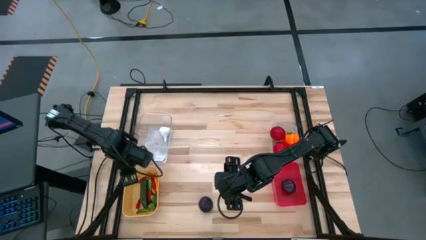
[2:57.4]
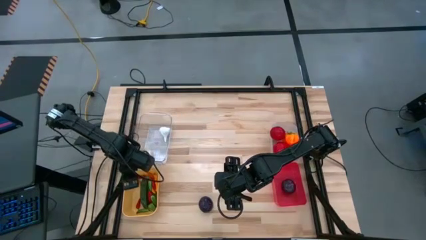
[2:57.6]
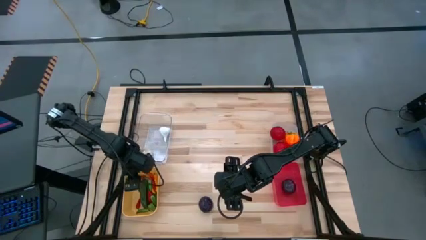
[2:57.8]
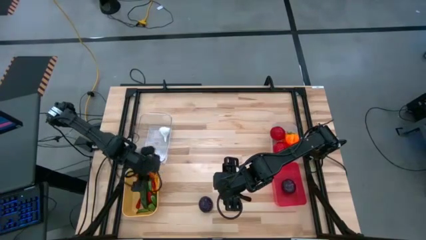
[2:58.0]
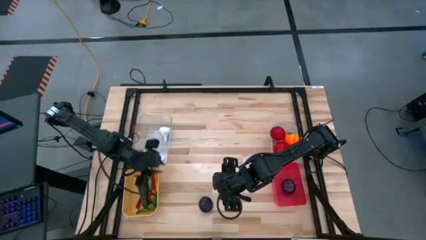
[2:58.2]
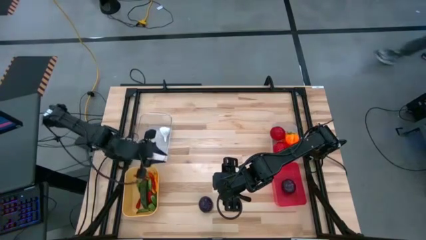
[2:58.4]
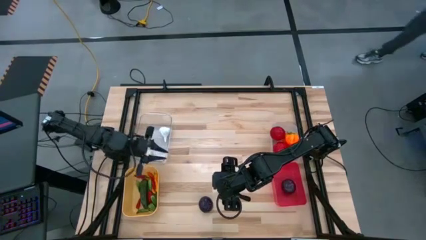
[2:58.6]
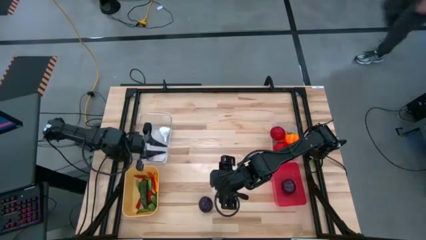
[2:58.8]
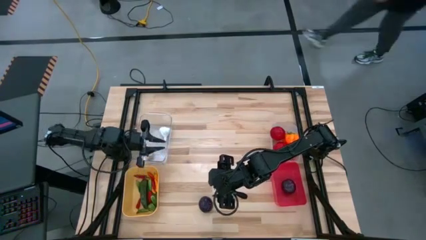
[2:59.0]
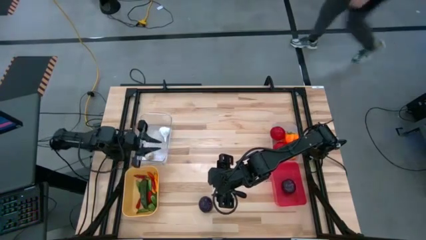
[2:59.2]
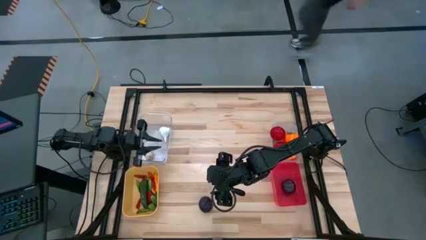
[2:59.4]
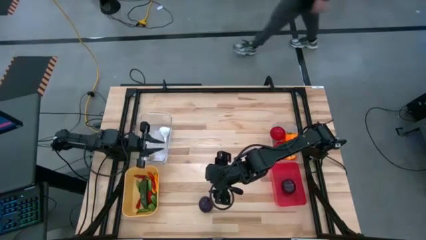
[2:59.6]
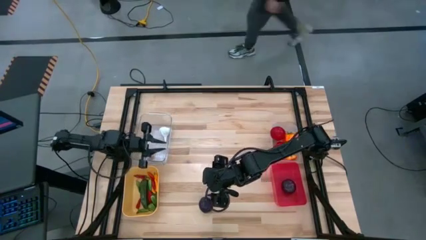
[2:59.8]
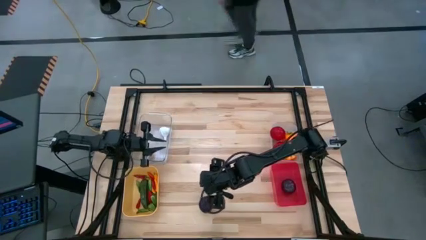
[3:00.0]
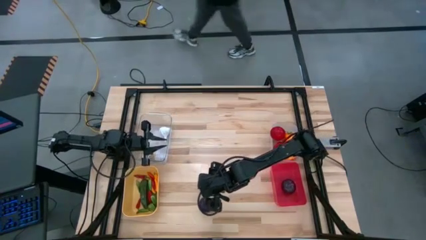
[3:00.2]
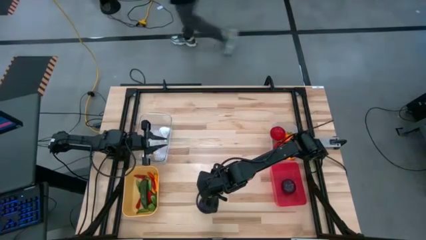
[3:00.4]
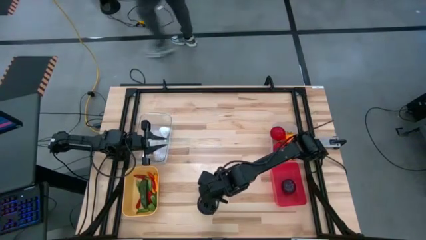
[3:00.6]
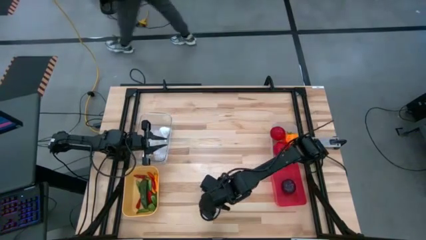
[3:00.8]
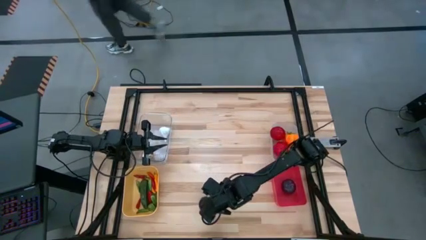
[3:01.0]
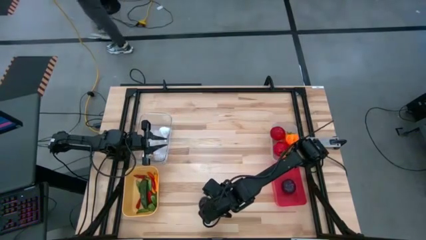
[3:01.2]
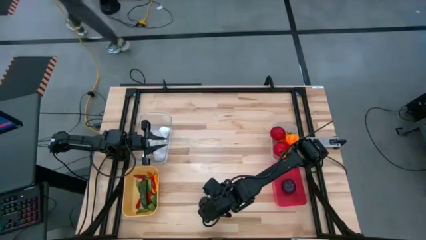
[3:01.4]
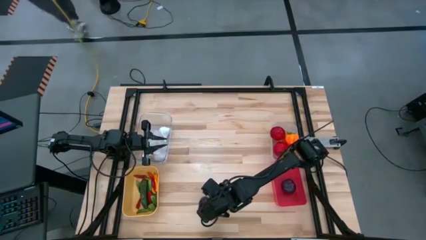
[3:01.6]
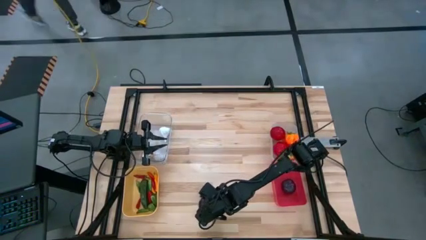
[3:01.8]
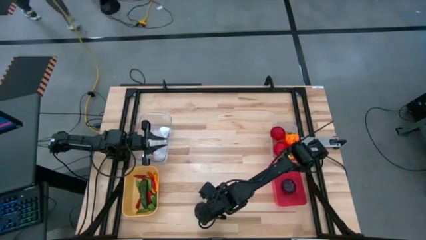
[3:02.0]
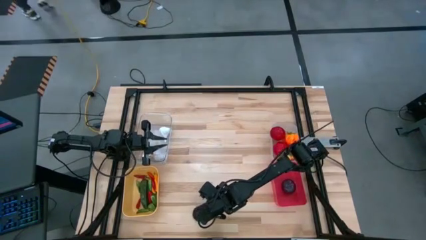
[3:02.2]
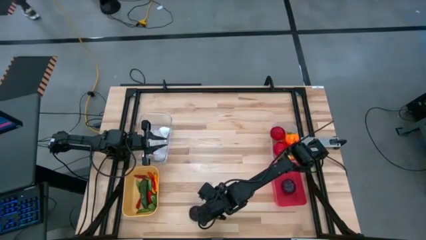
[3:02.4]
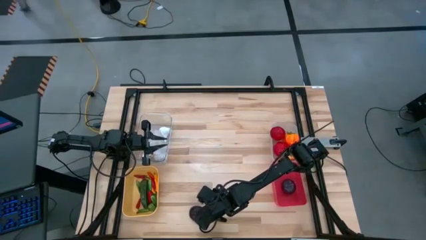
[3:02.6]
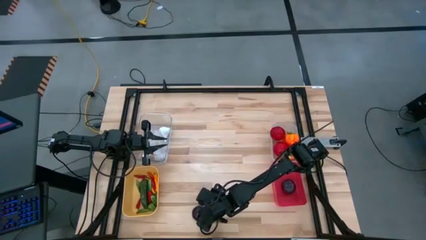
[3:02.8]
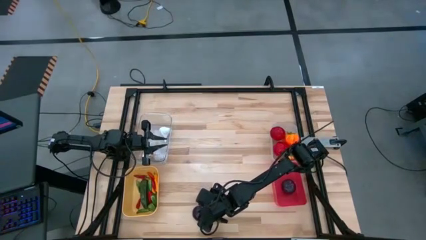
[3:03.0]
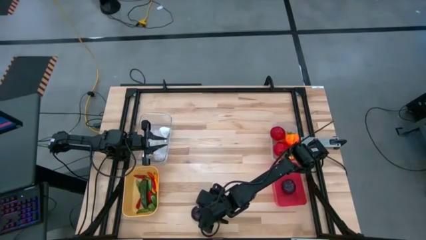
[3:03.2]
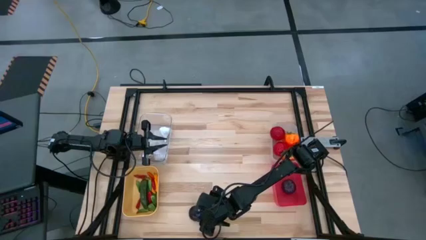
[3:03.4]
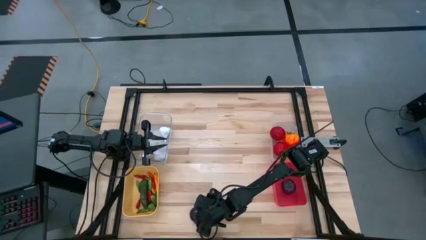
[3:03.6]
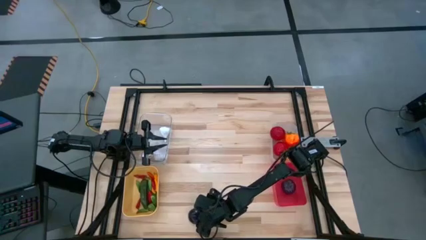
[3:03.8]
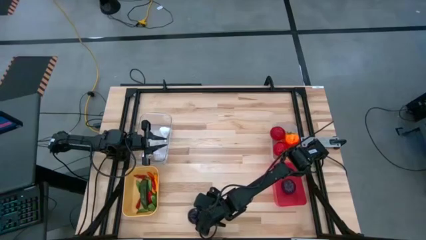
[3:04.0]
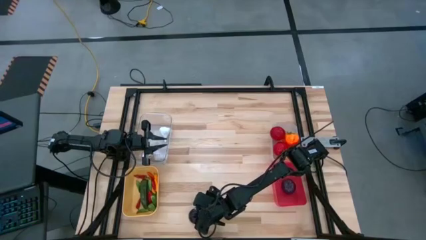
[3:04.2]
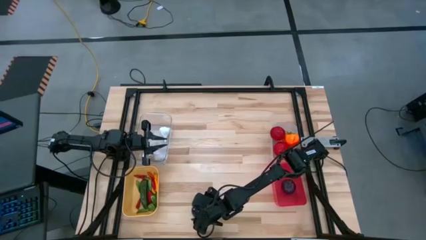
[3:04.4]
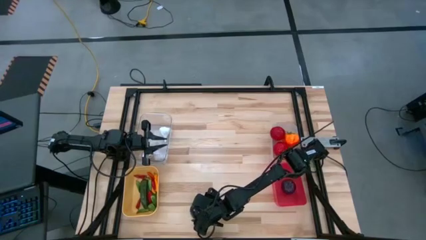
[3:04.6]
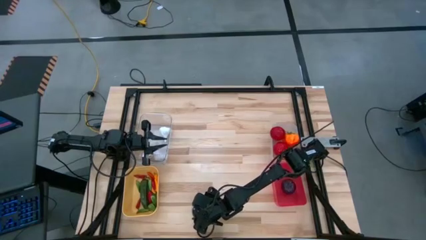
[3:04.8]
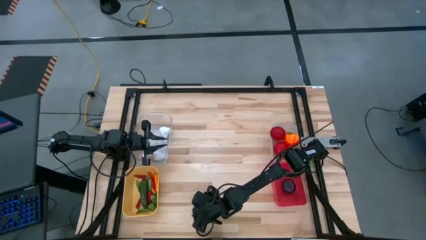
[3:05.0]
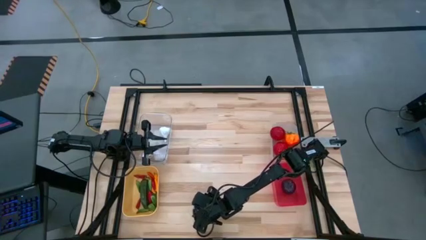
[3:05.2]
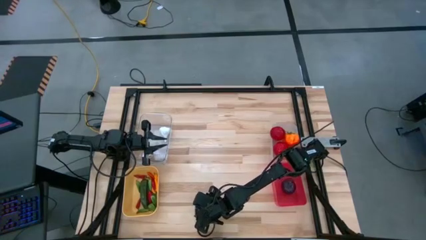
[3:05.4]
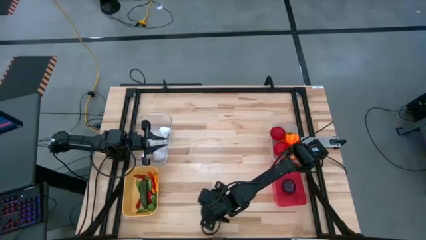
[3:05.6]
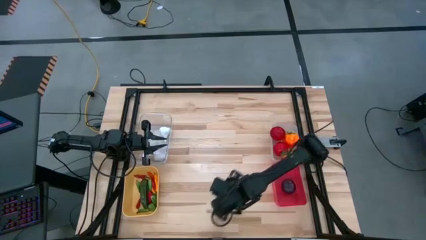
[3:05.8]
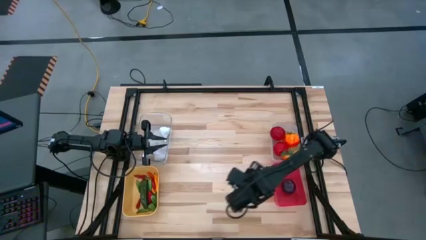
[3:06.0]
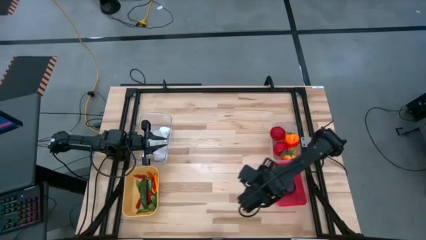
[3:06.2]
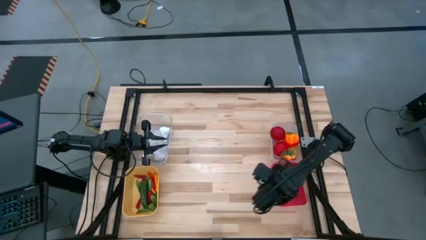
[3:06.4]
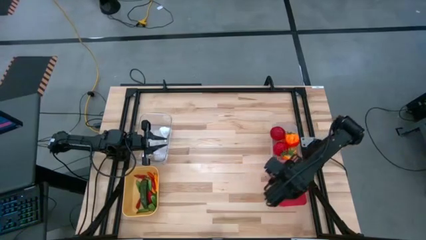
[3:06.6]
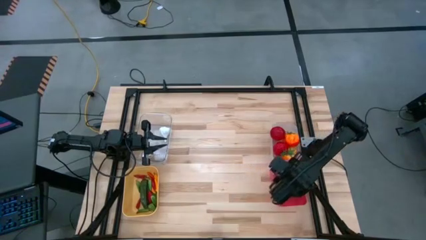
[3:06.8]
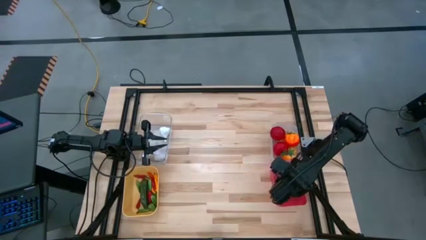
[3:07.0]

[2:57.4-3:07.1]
Task: Sort produce into baskets
Put the plum into the red bin

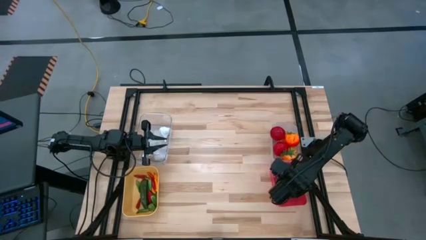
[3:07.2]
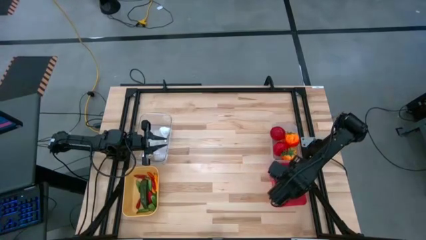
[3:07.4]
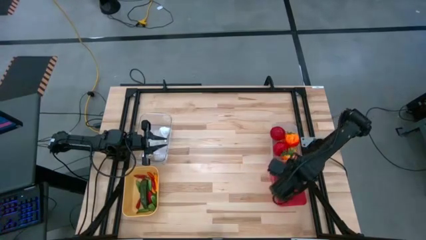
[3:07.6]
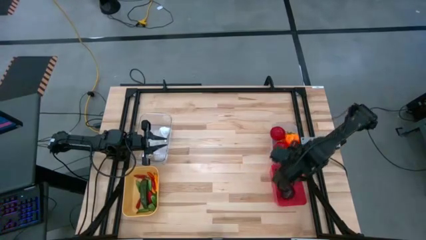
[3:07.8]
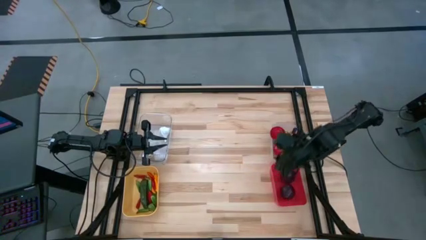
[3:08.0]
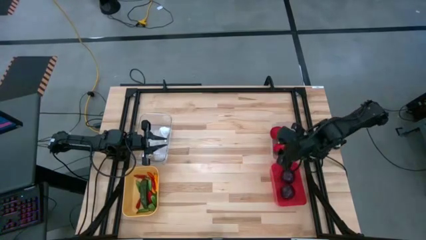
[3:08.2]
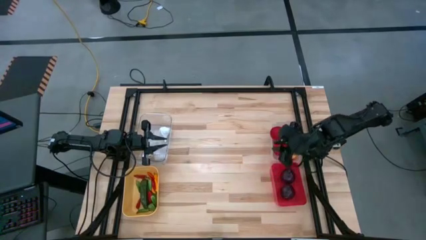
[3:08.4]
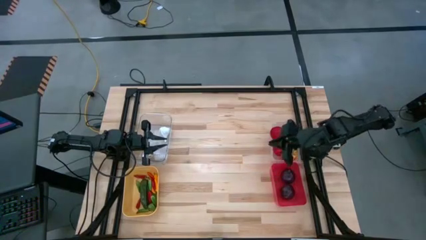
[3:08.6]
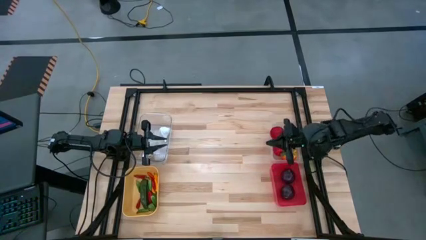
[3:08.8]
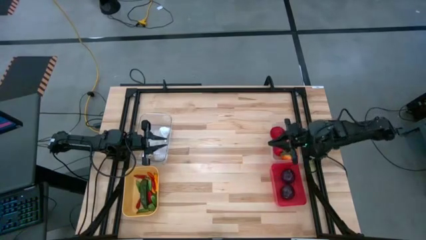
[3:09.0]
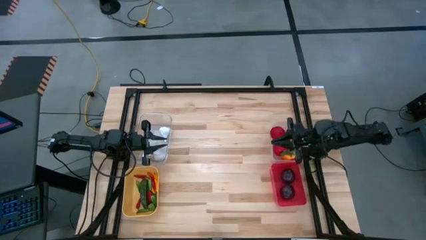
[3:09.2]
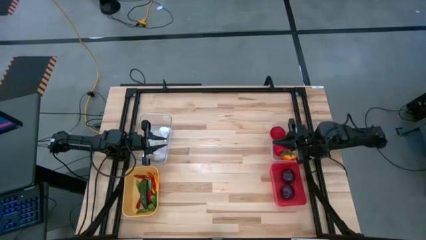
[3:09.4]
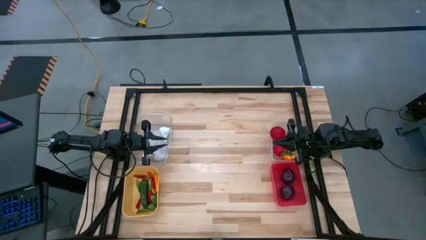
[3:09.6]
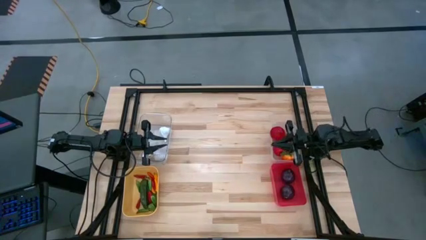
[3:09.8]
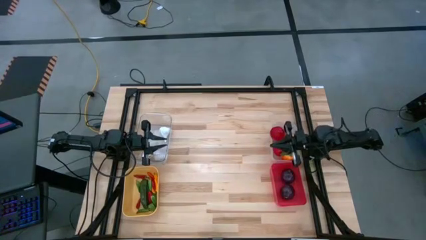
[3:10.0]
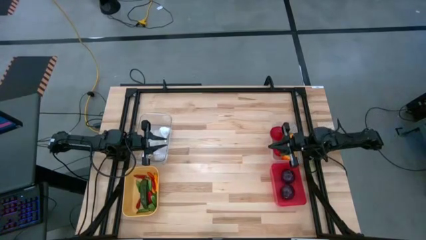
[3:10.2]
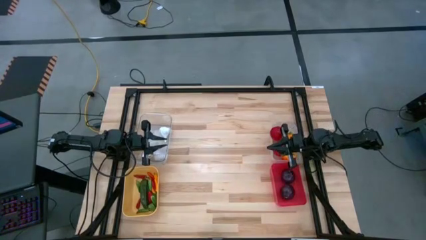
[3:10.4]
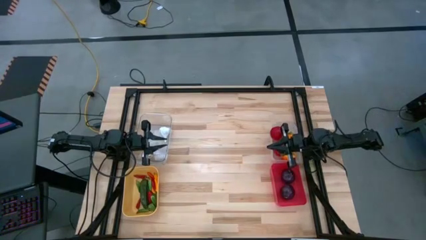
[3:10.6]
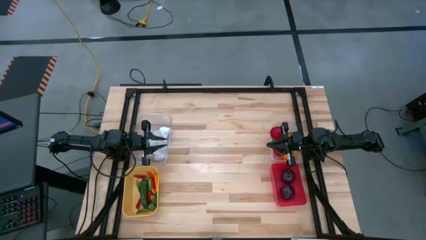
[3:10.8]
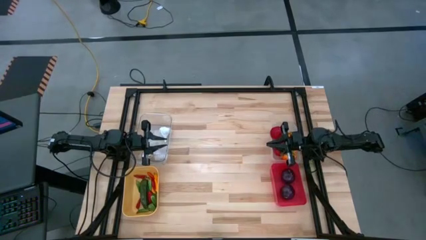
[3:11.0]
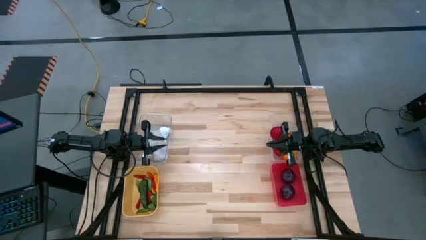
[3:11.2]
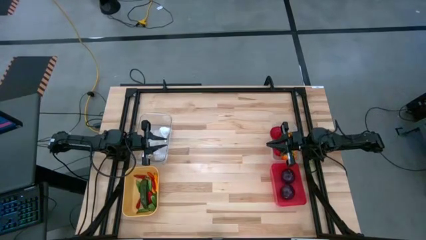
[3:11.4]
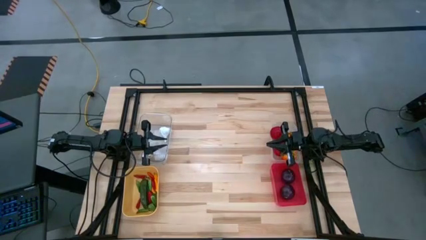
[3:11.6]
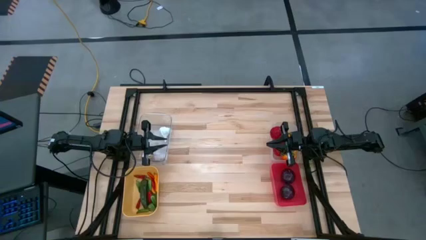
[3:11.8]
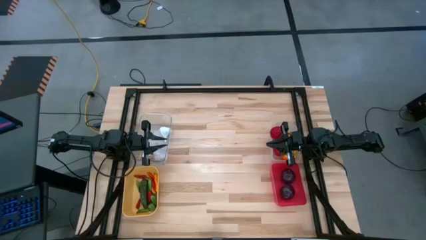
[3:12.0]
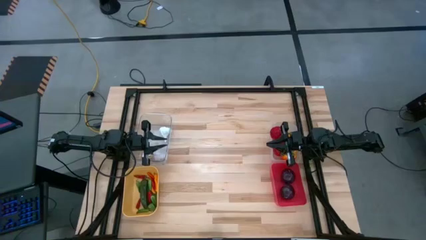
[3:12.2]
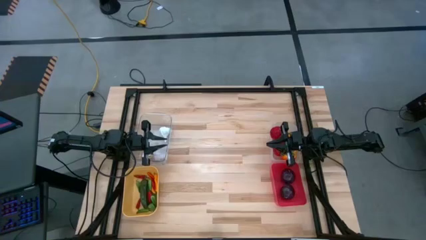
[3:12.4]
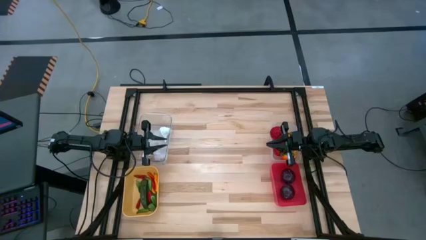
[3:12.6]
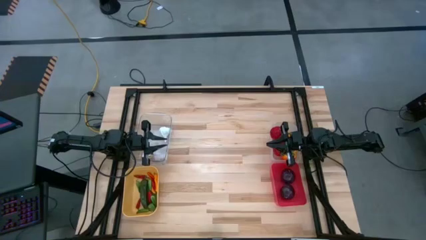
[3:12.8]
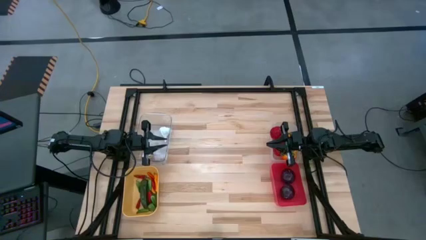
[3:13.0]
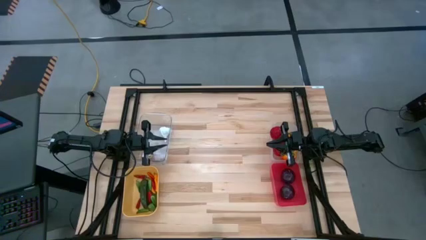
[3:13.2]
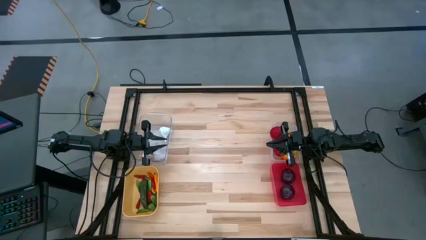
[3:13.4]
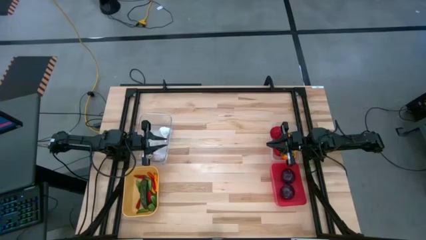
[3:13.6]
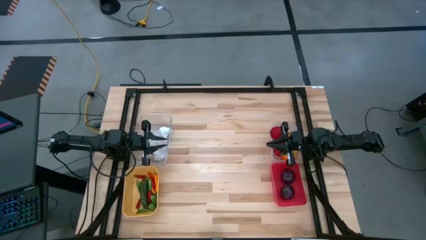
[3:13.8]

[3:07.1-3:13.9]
Return to Home Position
